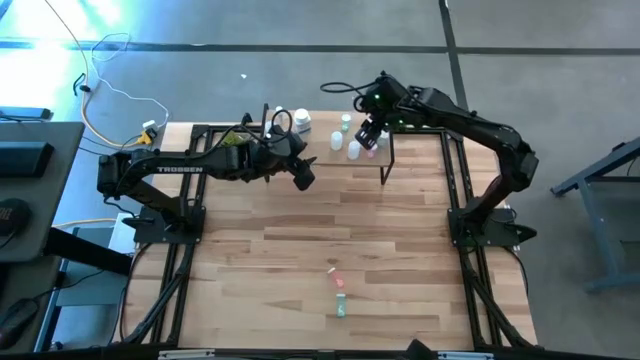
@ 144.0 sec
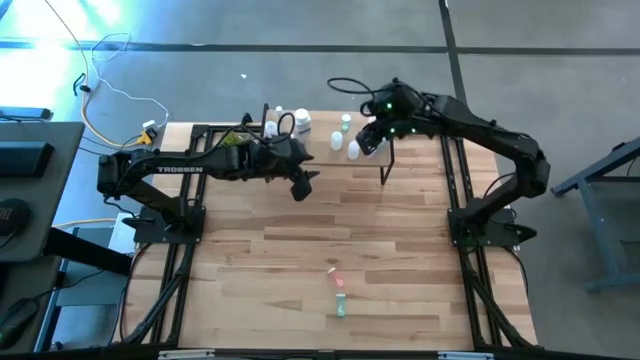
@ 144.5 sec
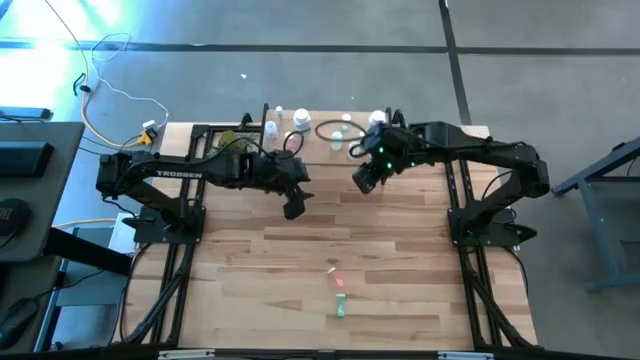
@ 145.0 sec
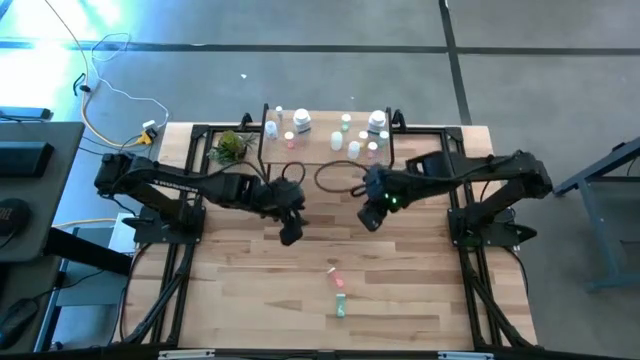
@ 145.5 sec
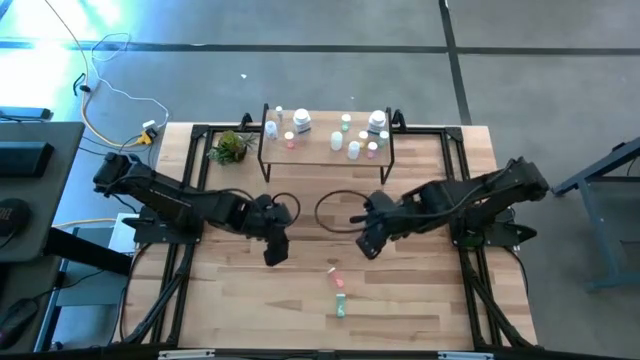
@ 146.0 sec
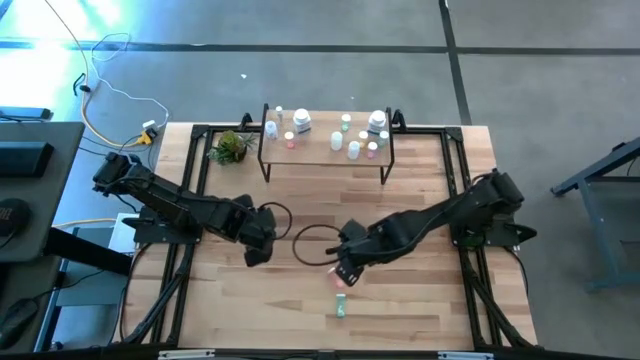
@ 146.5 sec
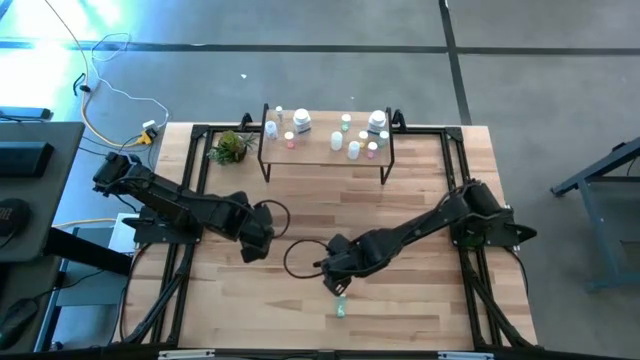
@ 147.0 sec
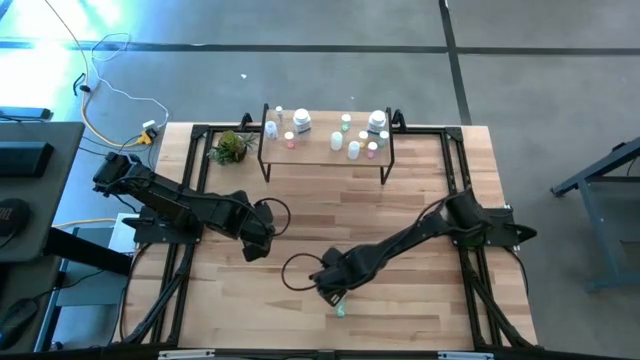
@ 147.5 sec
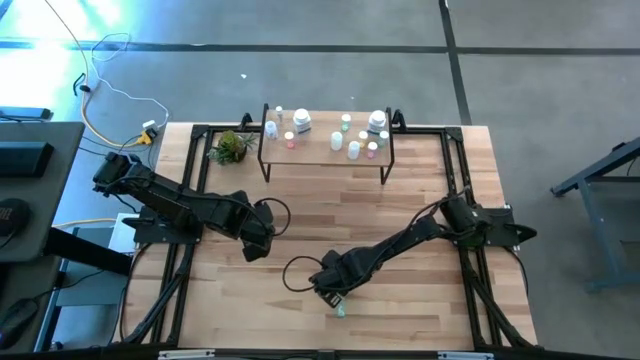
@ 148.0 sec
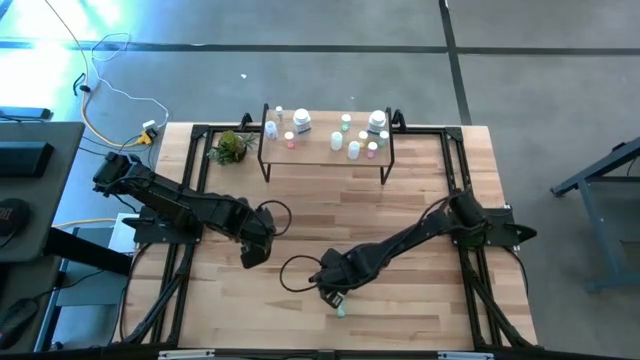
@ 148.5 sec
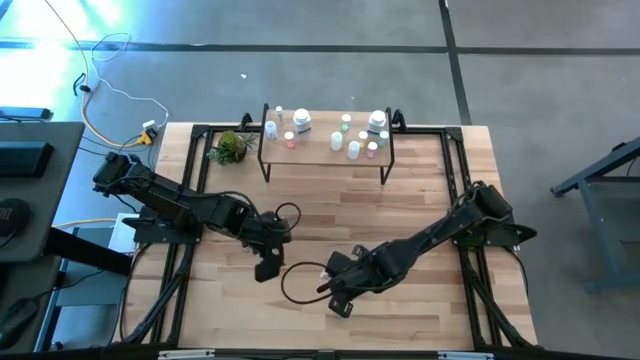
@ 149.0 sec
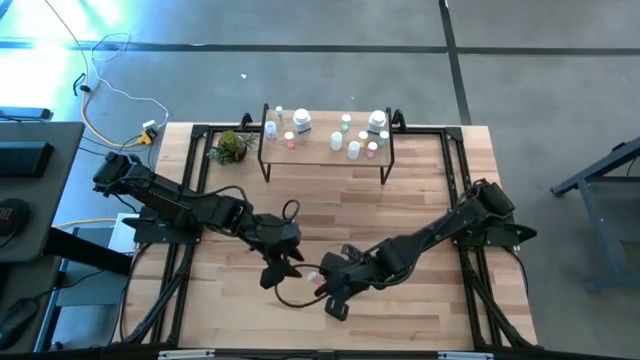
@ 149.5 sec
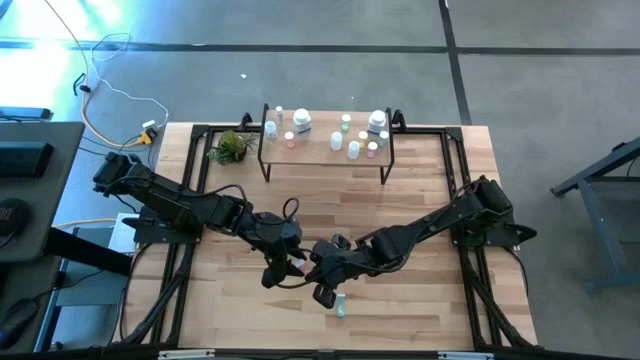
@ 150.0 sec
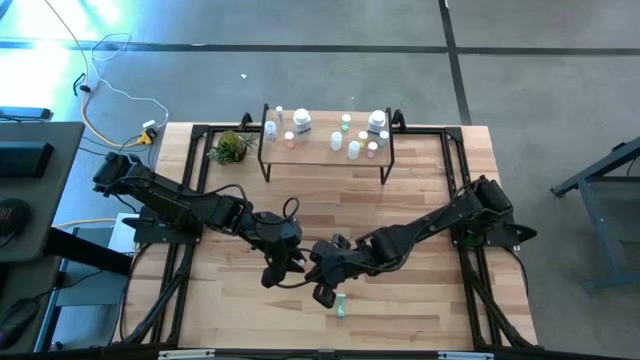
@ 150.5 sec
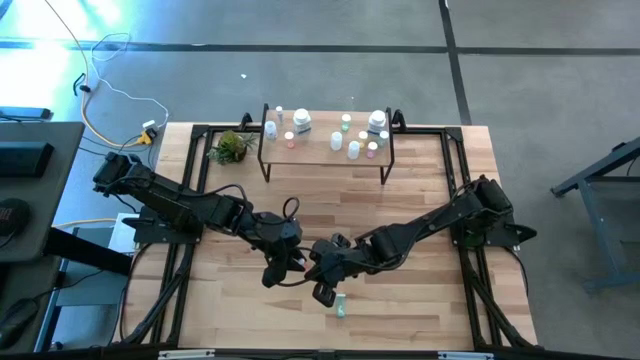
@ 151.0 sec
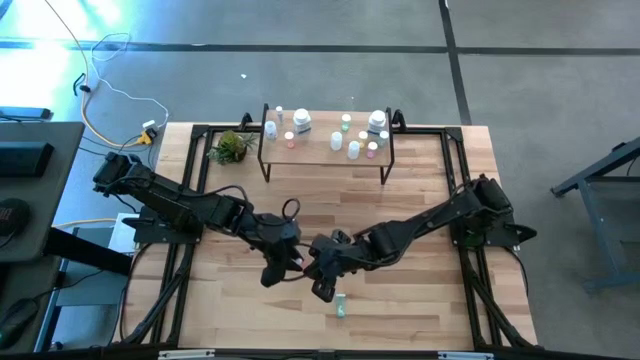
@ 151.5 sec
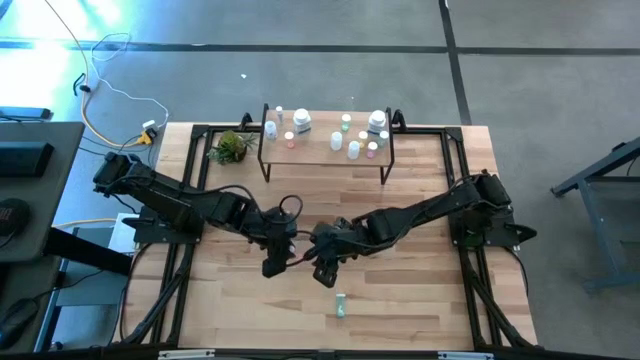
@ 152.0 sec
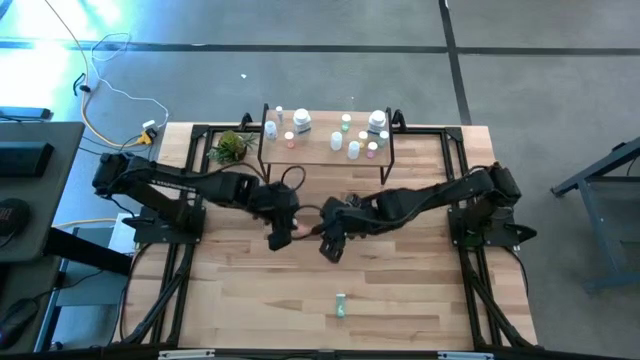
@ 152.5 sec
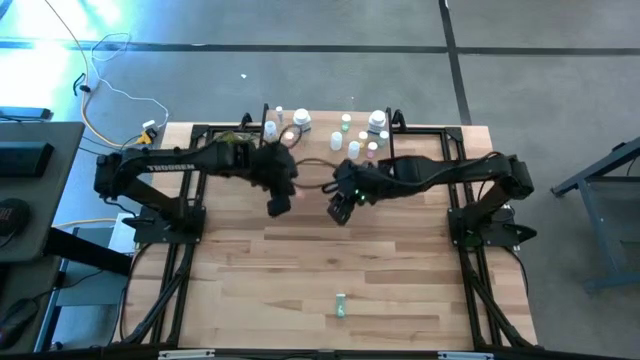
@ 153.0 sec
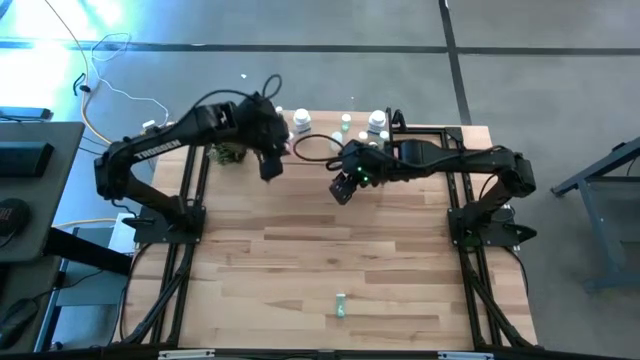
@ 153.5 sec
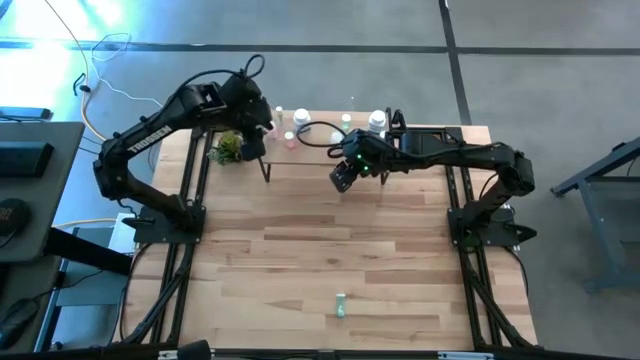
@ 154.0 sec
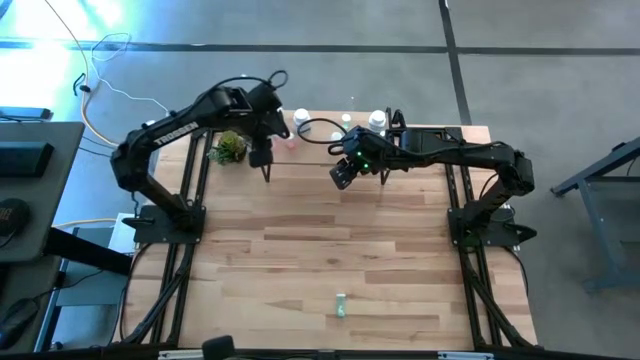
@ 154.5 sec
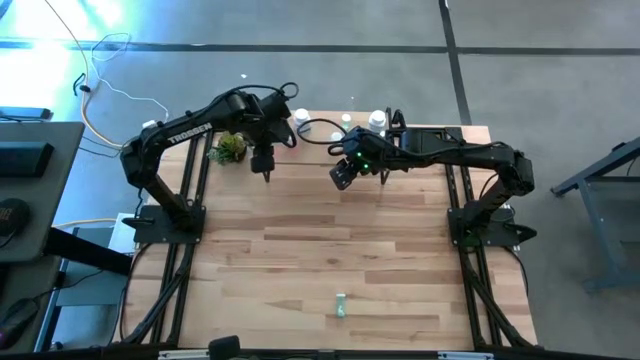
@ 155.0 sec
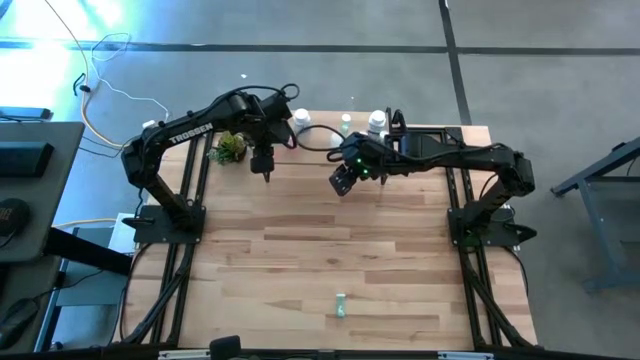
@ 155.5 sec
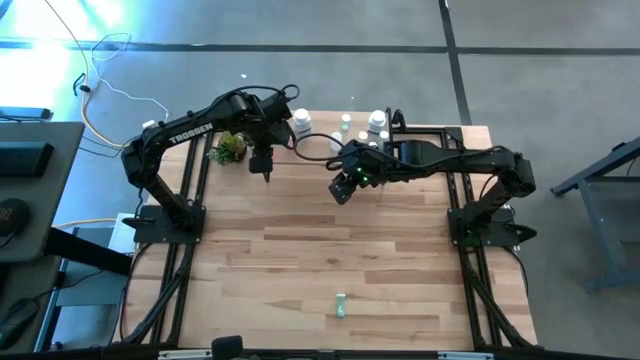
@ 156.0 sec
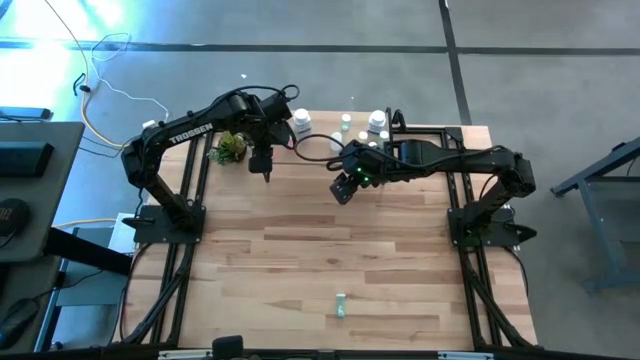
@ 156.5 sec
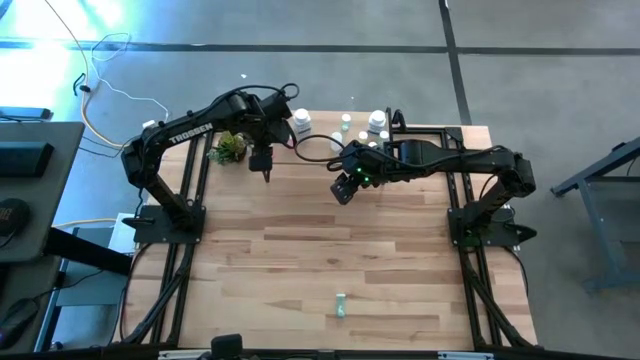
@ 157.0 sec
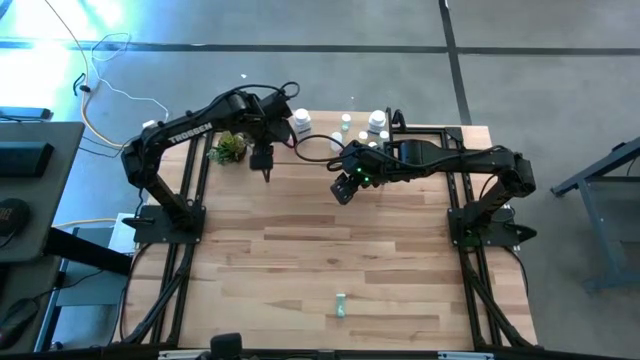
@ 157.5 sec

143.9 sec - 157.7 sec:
Task: Pick and place medicine bottles onto shelf by color
Put the orange pill bottle on the shelf

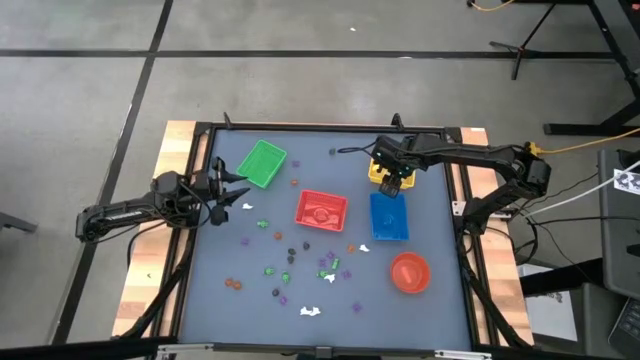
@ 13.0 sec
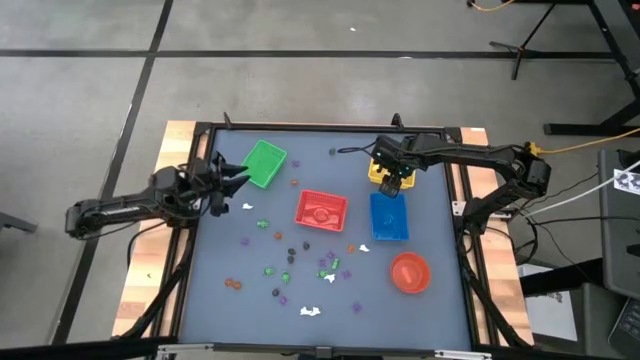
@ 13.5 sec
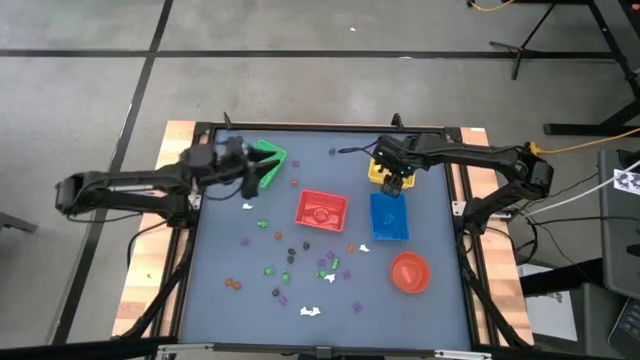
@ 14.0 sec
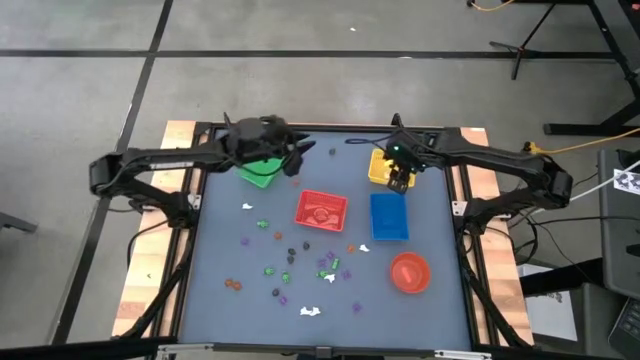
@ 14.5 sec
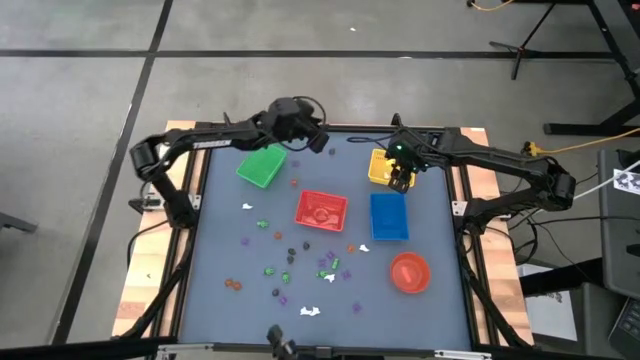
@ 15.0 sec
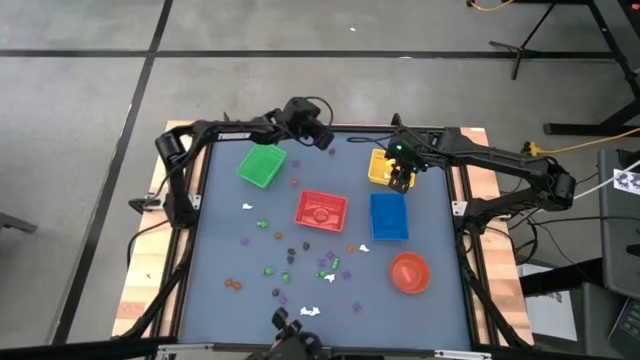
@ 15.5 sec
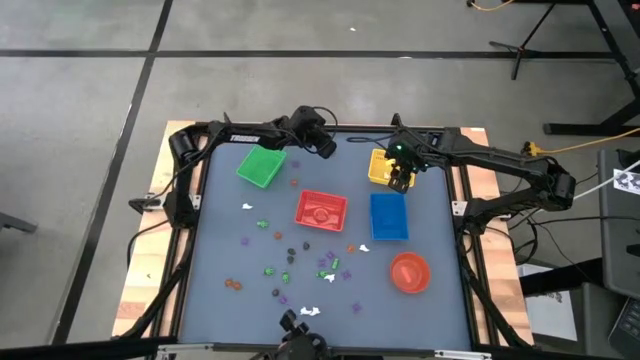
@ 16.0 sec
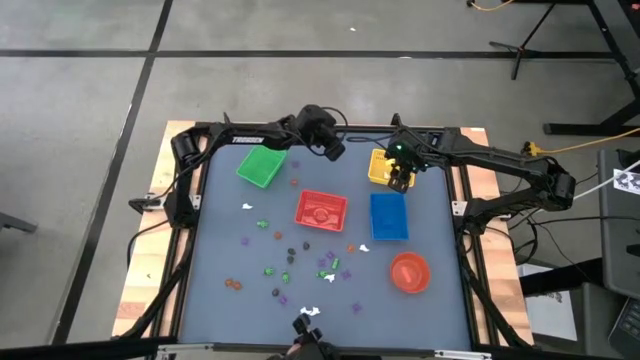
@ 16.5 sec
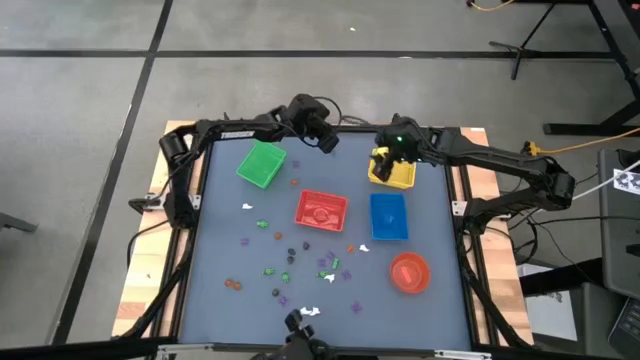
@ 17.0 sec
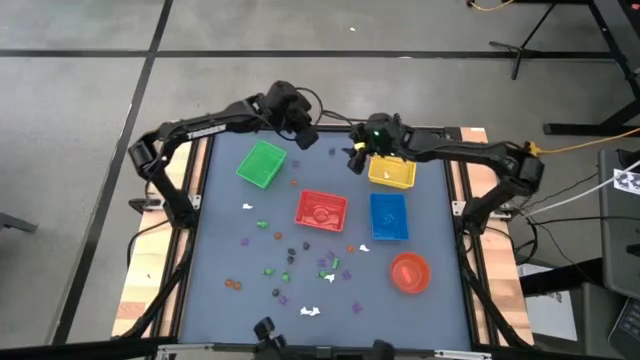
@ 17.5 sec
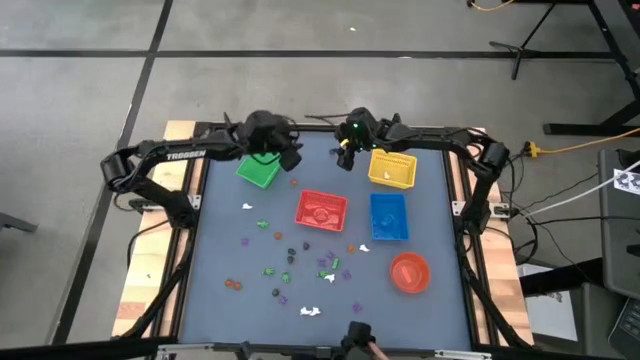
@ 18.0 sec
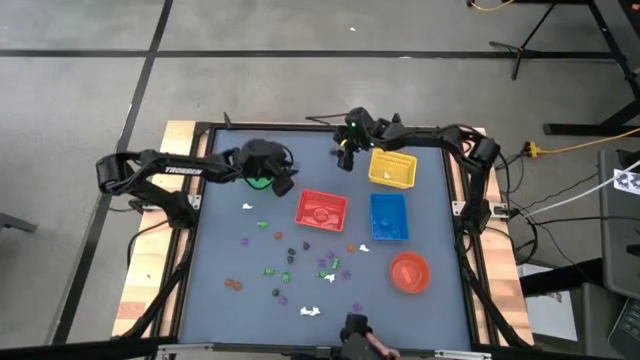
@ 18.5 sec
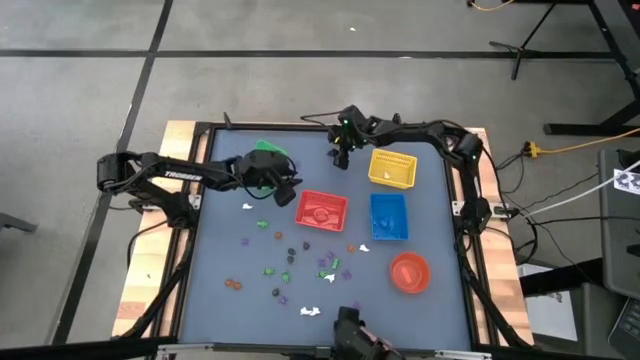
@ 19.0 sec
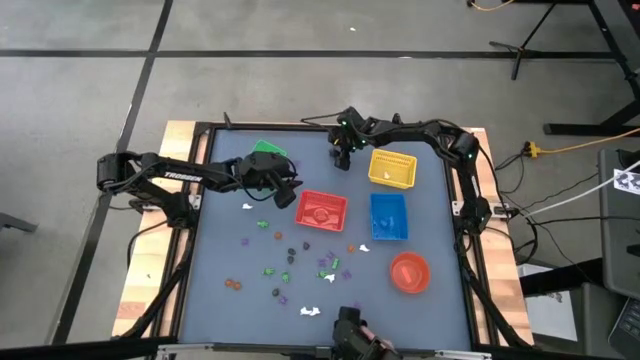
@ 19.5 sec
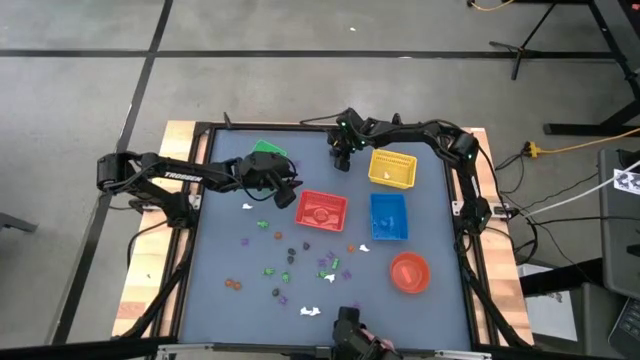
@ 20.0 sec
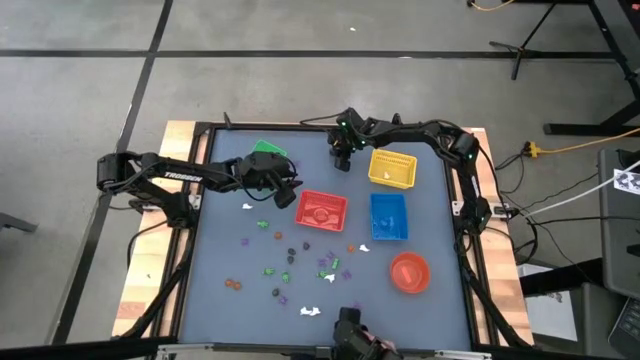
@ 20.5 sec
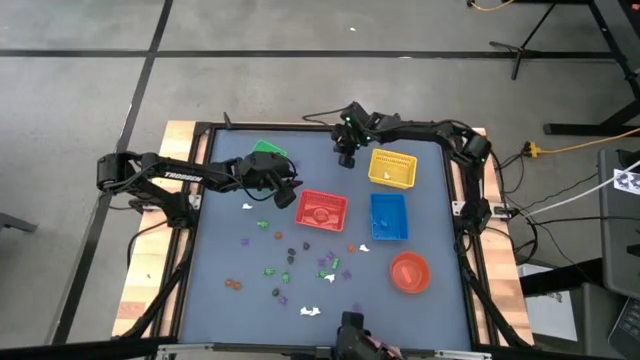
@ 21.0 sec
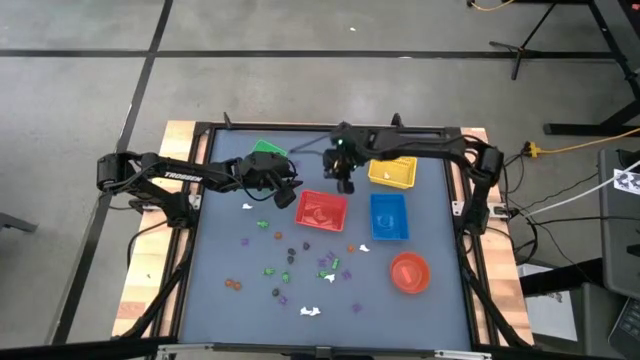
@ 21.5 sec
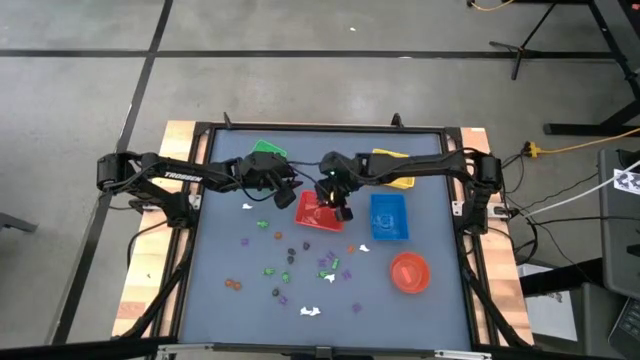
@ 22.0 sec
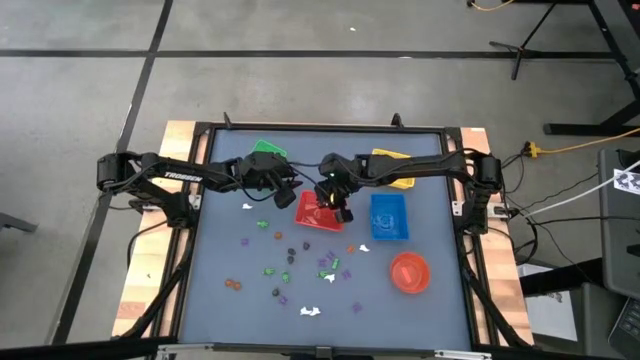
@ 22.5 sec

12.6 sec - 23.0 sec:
Task: Sort Halloween decoration
Put the black skull toy into the red bin
